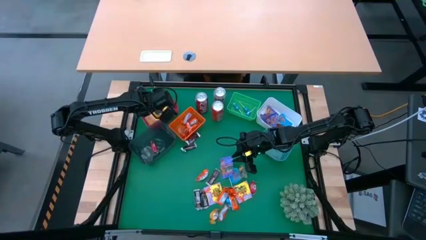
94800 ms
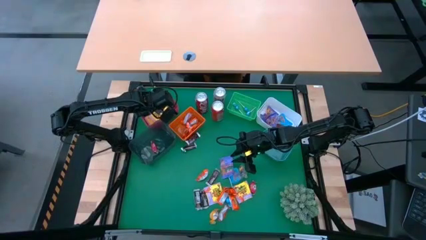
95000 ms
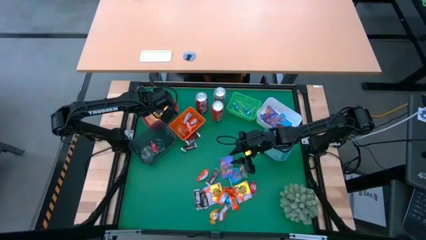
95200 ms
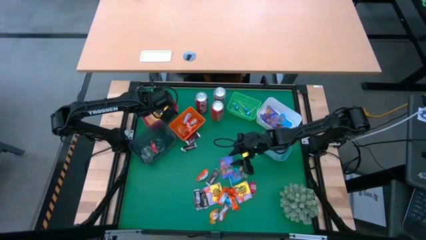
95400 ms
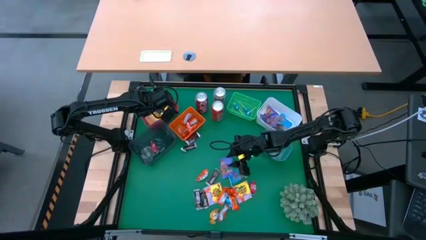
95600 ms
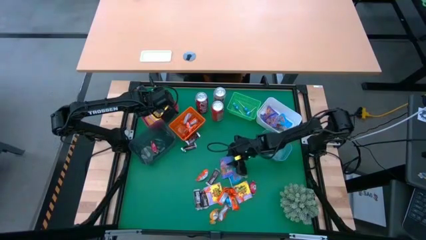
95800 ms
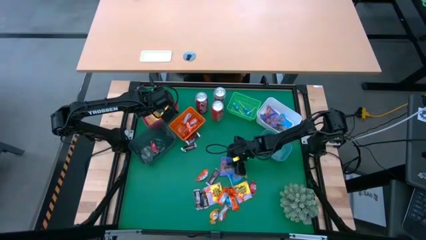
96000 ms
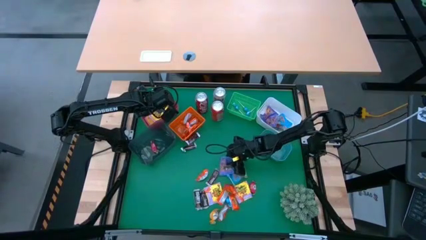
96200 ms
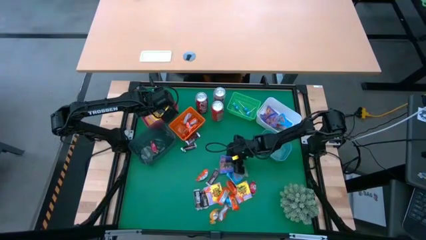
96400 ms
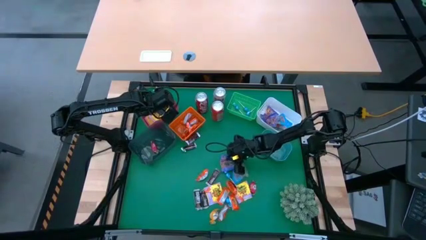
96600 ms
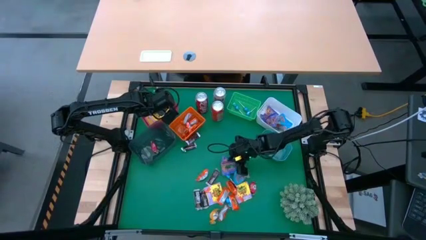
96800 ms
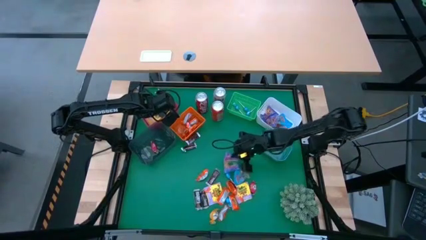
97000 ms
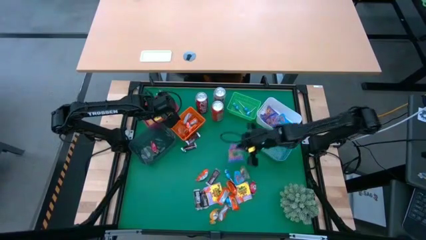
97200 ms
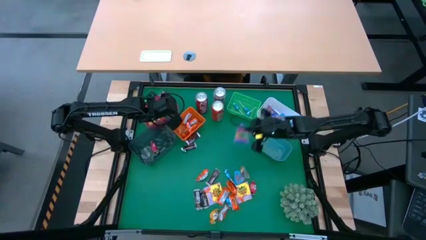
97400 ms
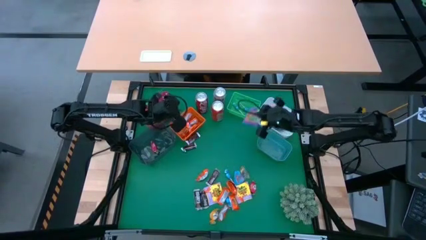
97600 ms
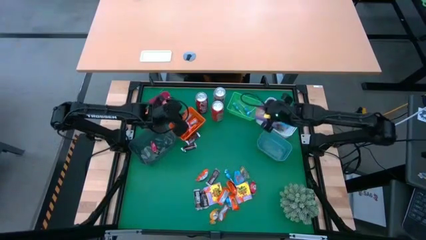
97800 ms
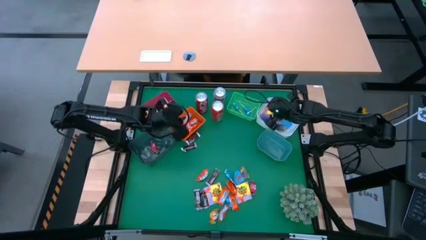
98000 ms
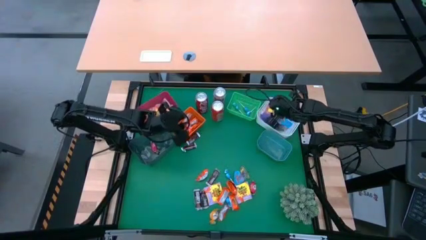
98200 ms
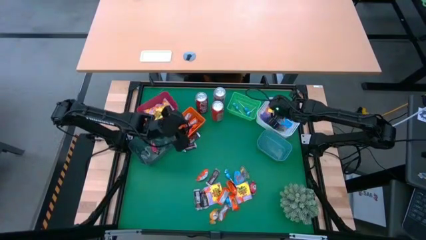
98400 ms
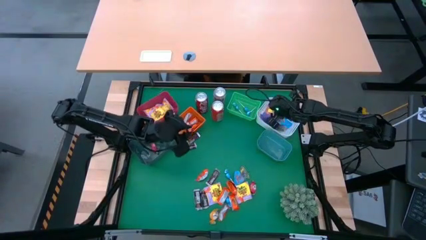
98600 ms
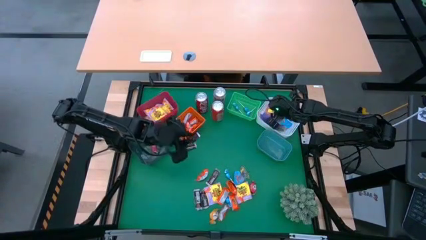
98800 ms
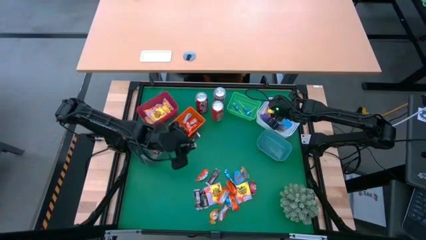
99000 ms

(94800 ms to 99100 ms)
Task: Sort candy
Put the violet gummy into the white bin

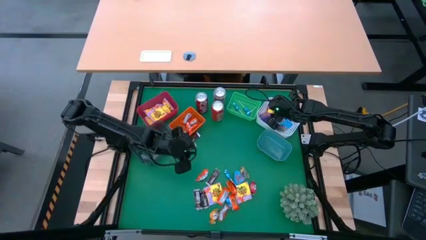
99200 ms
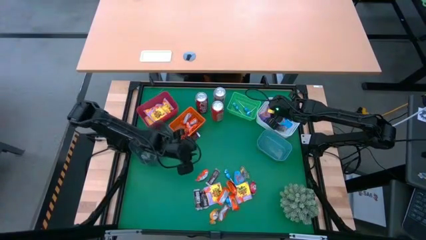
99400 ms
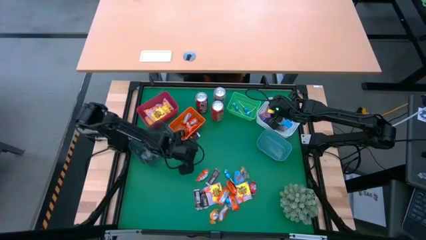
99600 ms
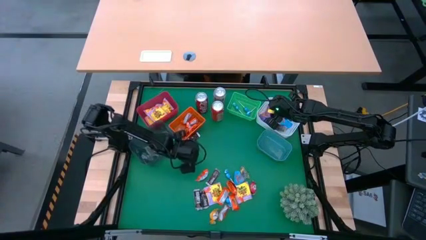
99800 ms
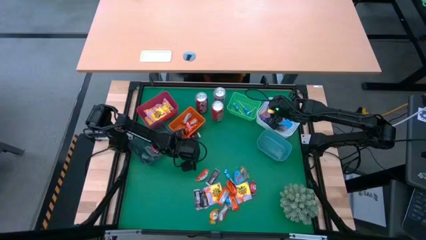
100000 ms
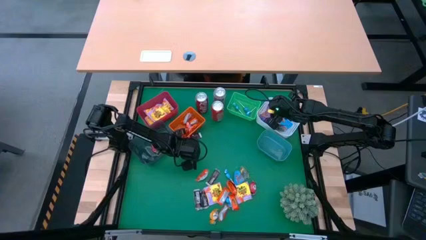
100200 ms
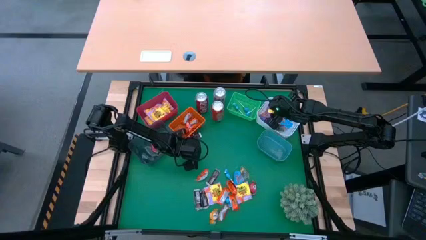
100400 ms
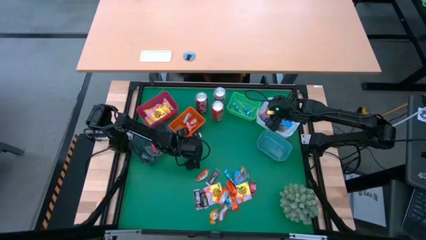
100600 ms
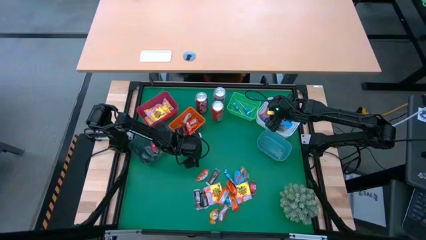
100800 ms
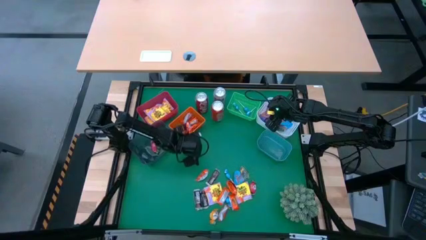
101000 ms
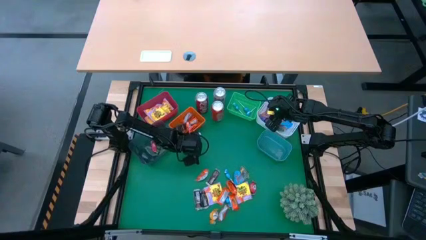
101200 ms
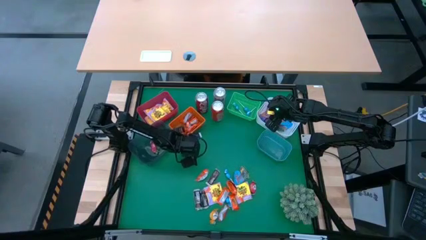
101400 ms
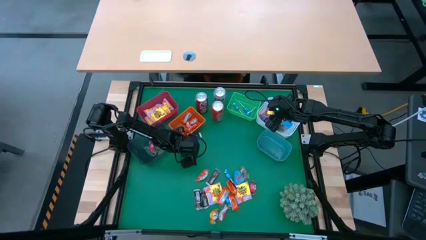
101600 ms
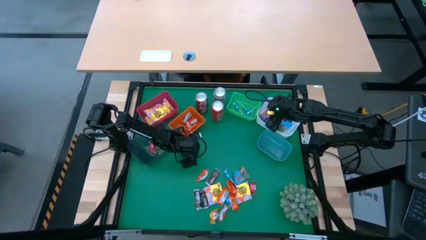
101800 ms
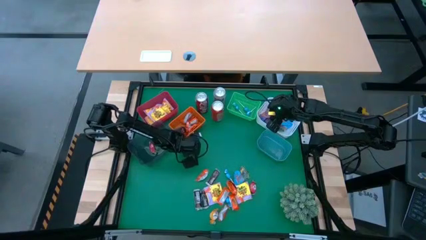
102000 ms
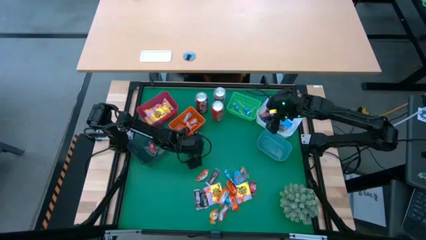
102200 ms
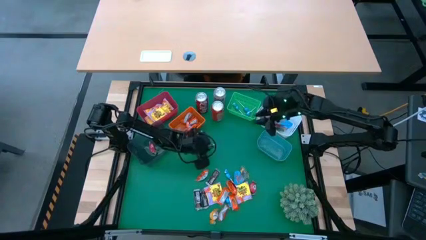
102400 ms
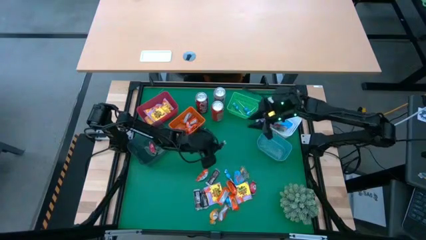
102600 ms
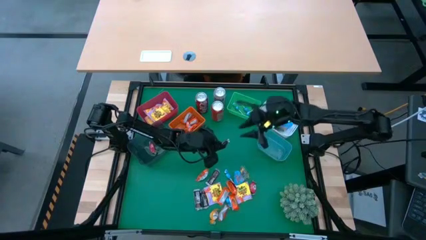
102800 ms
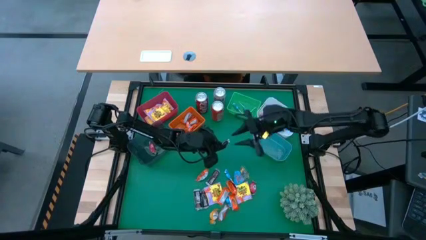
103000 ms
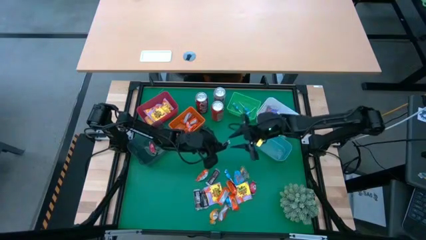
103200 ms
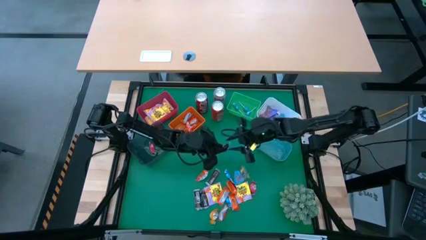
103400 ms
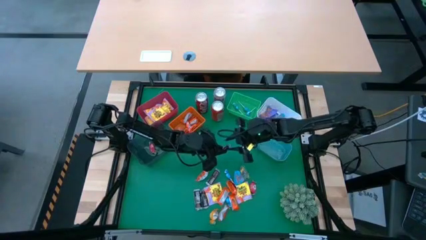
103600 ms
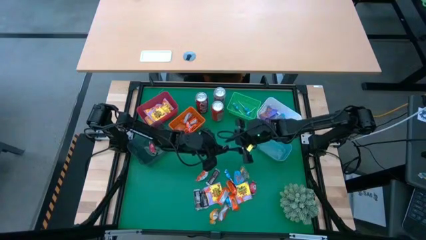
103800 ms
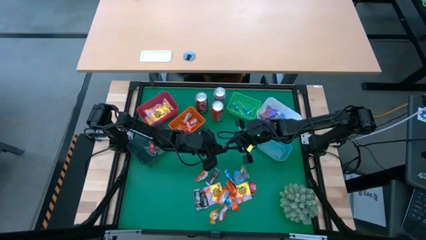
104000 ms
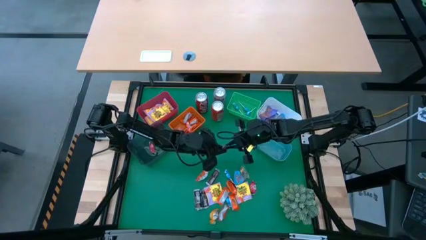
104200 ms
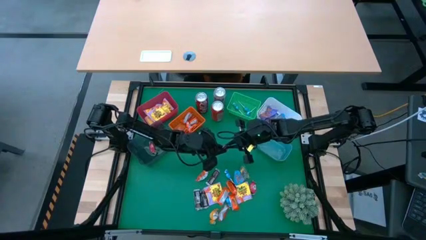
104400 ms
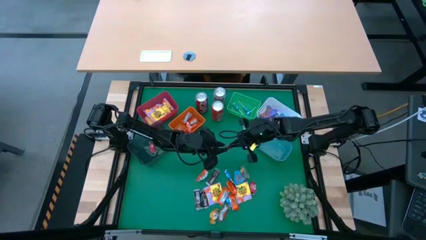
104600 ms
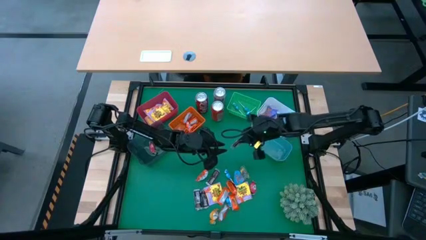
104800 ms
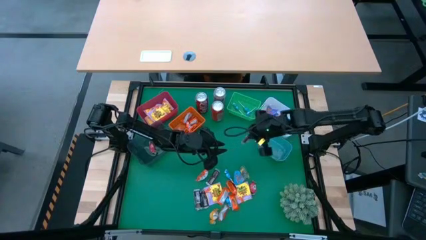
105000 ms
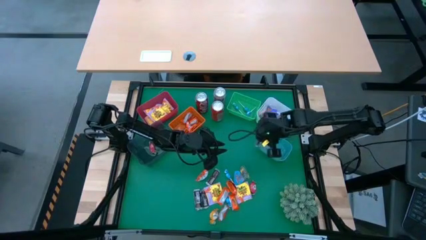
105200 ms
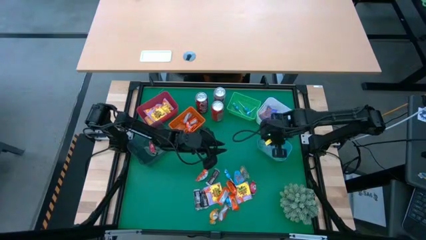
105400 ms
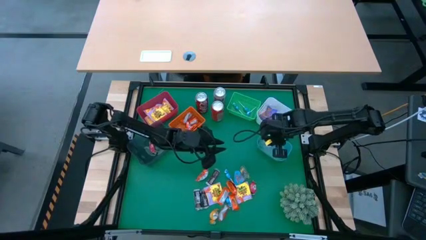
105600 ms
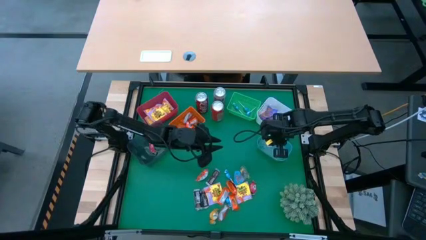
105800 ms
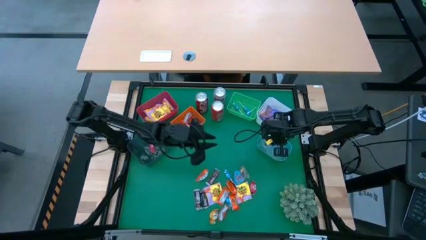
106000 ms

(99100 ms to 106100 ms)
Put the brown chocolate into the blue bin

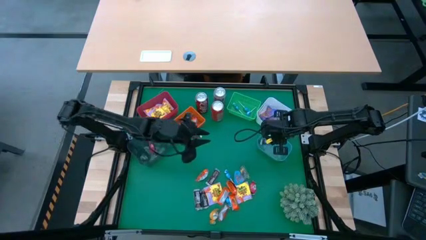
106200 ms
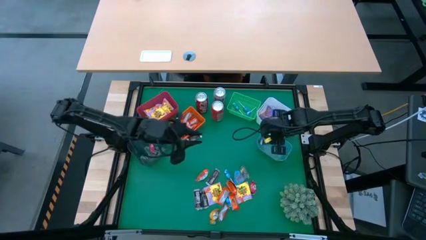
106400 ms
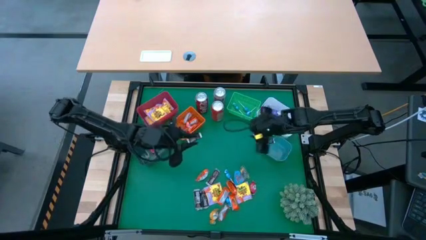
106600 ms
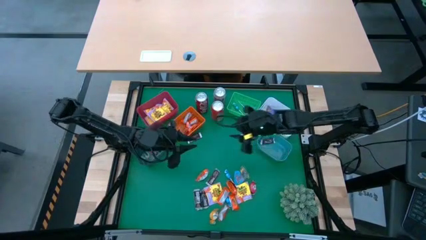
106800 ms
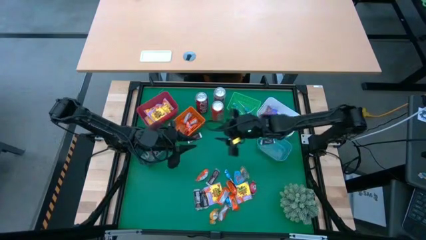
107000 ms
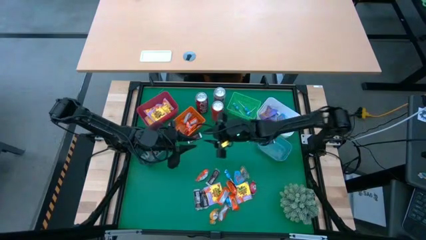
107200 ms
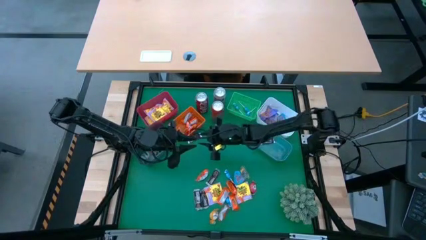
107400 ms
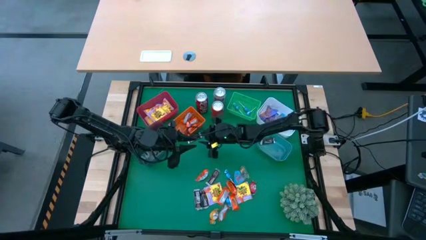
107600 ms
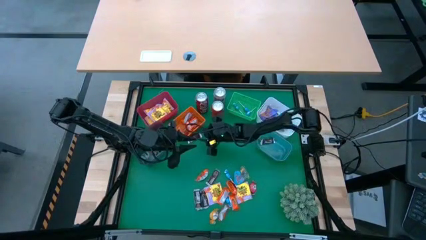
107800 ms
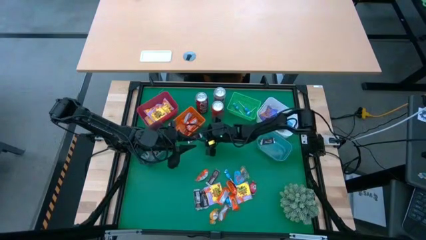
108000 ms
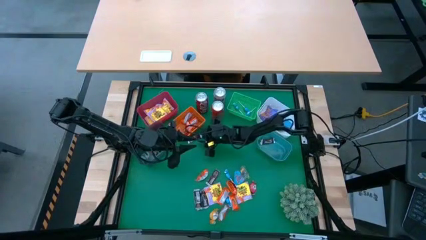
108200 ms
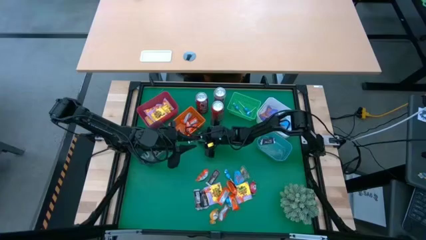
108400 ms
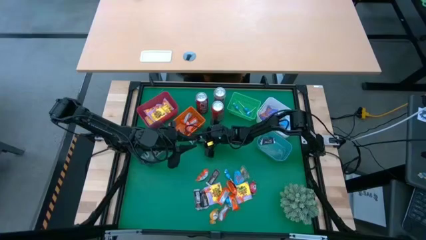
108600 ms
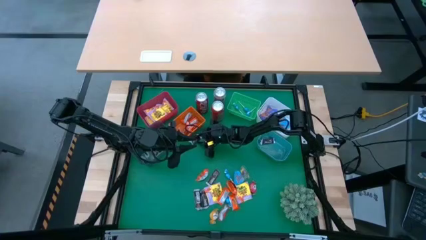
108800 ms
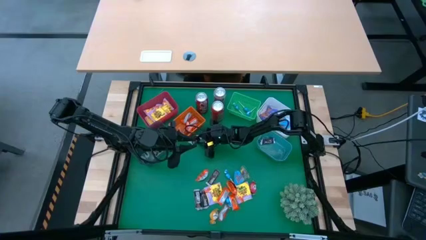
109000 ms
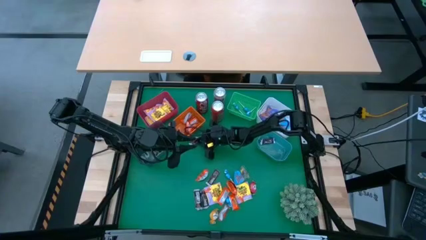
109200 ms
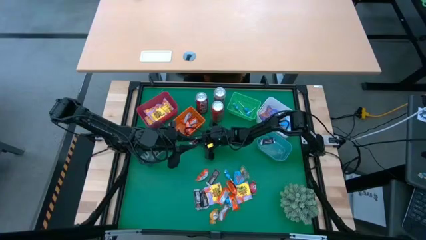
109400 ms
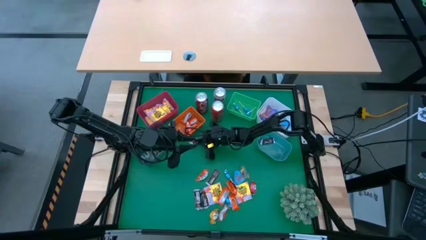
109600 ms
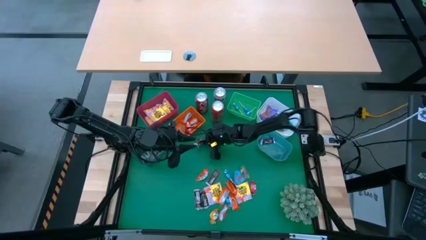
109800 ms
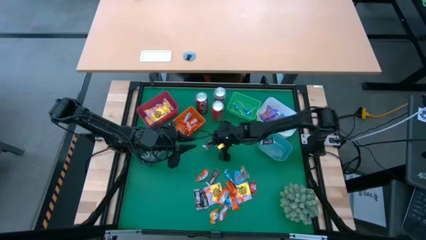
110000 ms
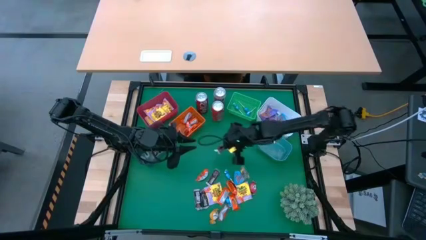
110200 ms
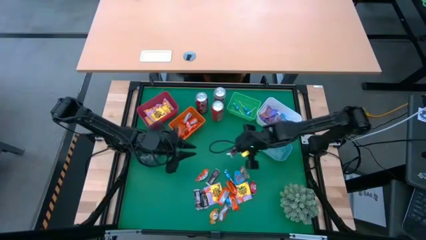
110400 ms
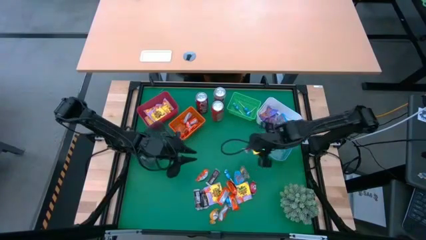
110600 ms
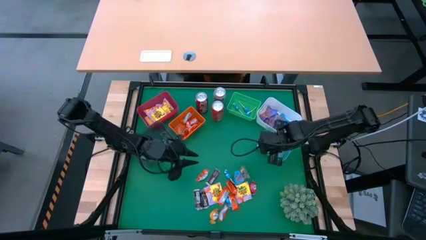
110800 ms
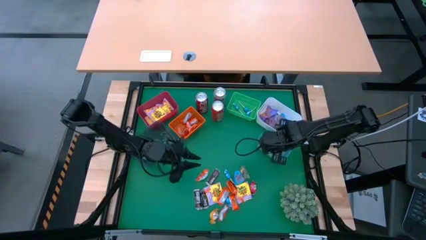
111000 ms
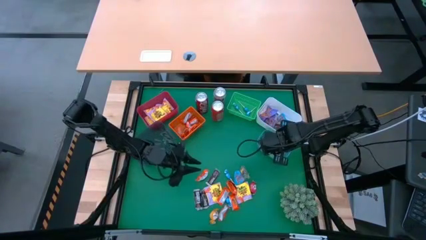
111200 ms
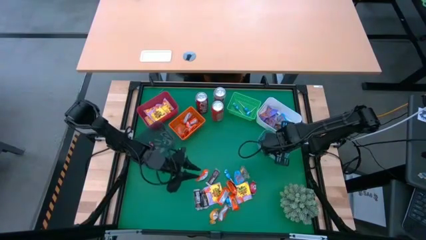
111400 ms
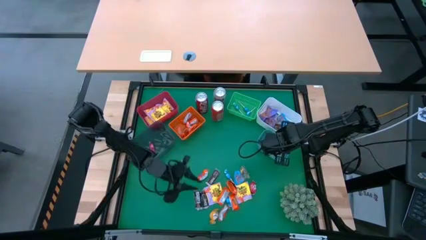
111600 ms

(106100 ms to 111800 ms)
Put the brown chocolate into the blue bin
